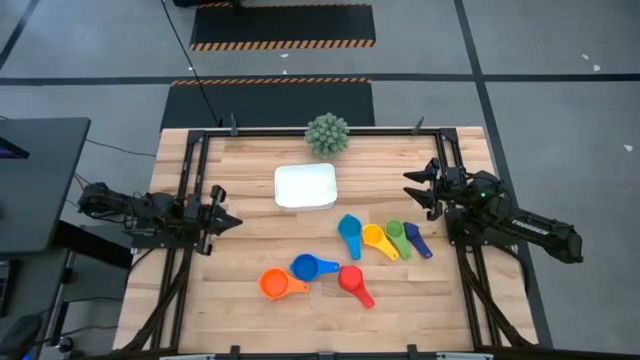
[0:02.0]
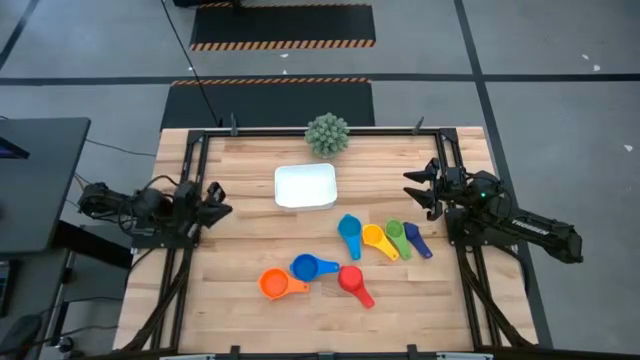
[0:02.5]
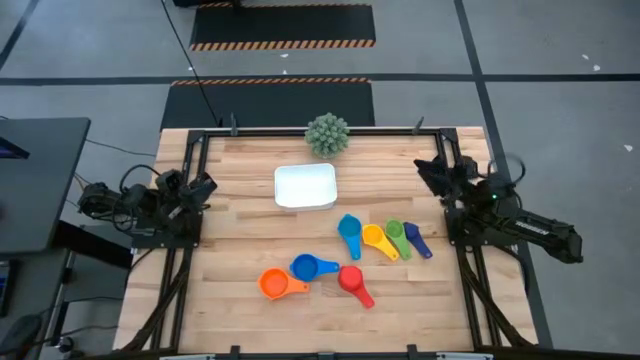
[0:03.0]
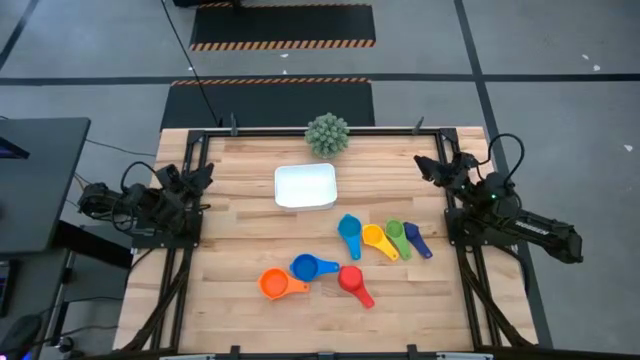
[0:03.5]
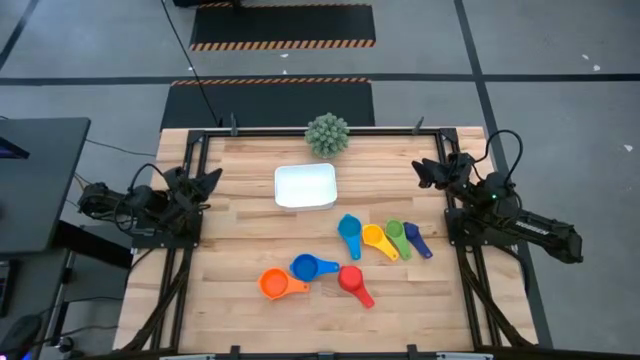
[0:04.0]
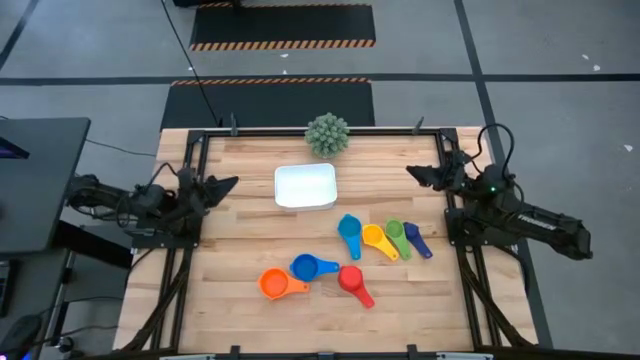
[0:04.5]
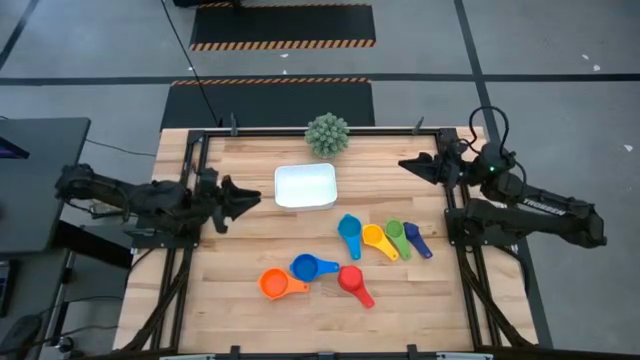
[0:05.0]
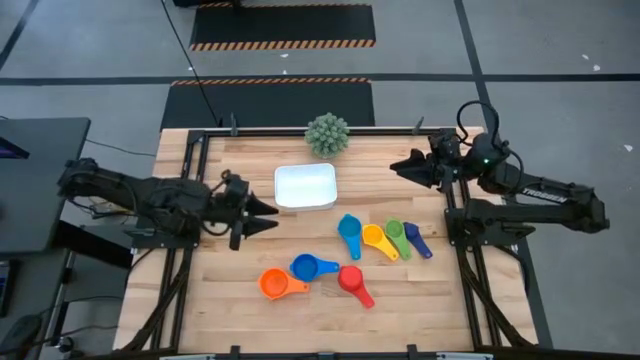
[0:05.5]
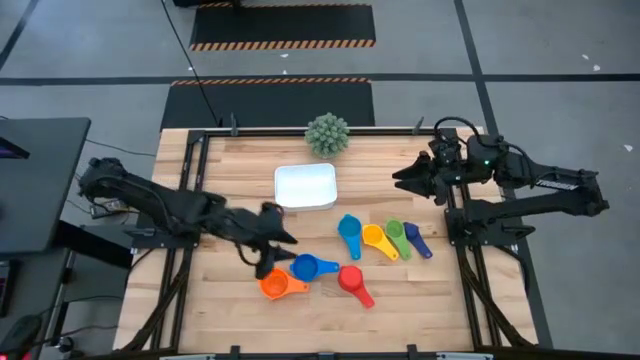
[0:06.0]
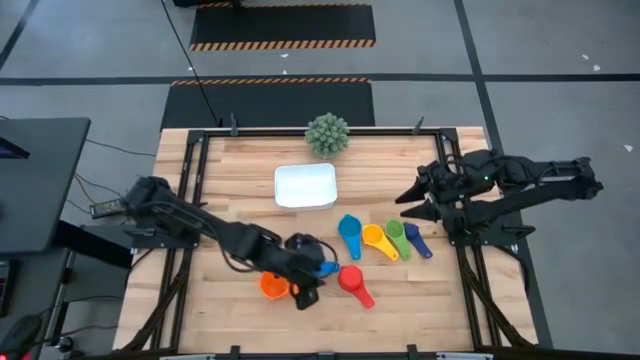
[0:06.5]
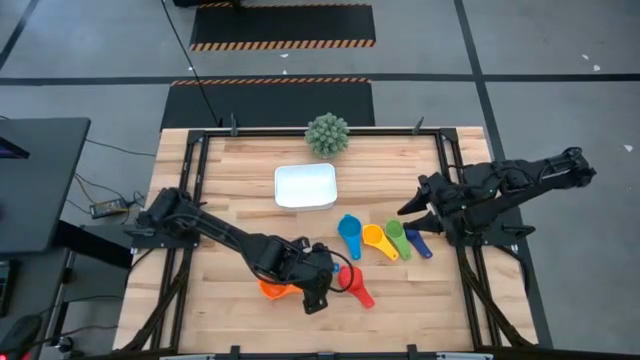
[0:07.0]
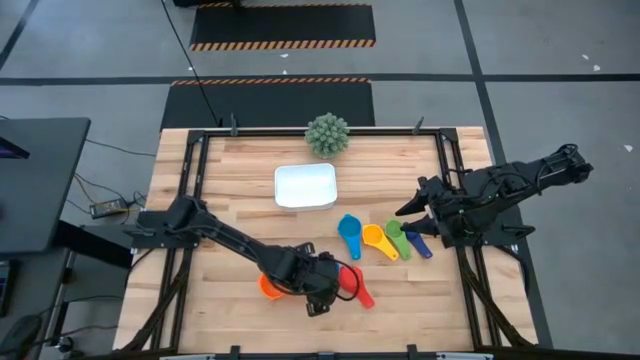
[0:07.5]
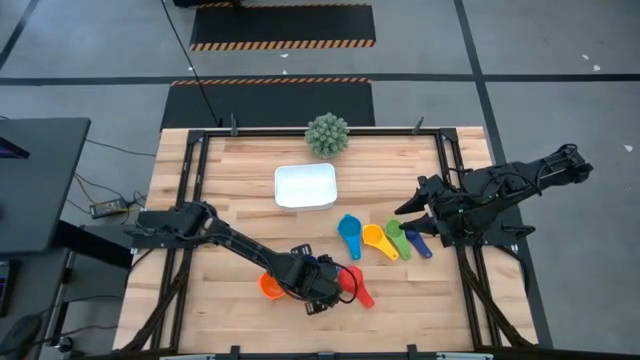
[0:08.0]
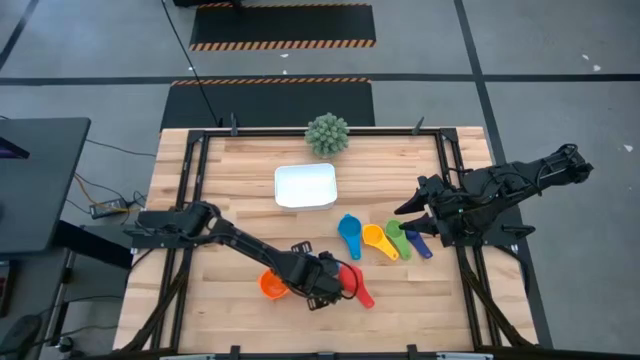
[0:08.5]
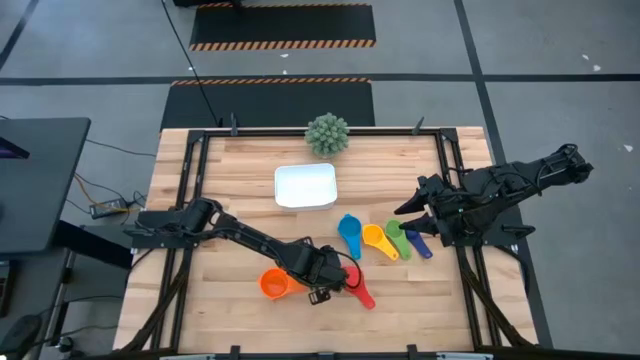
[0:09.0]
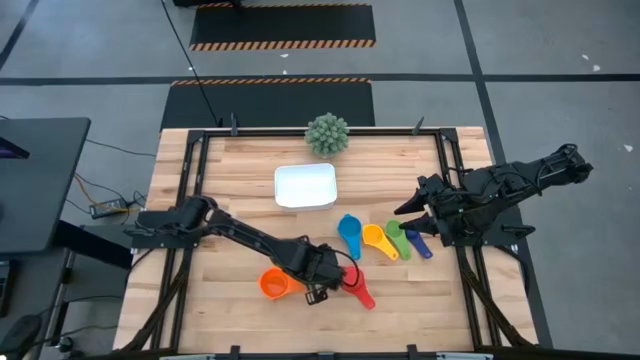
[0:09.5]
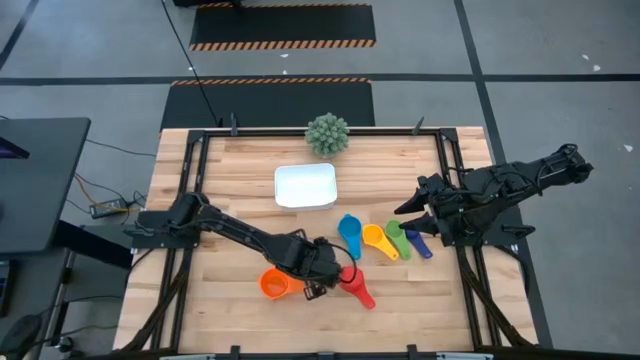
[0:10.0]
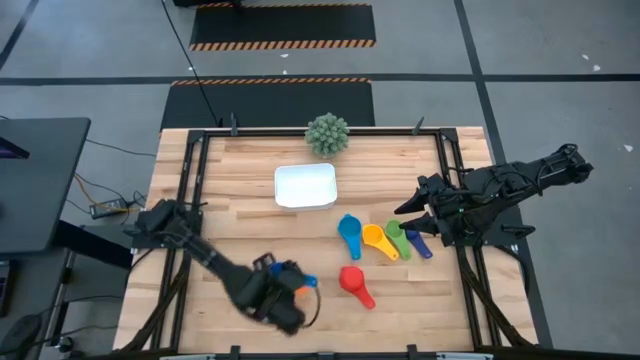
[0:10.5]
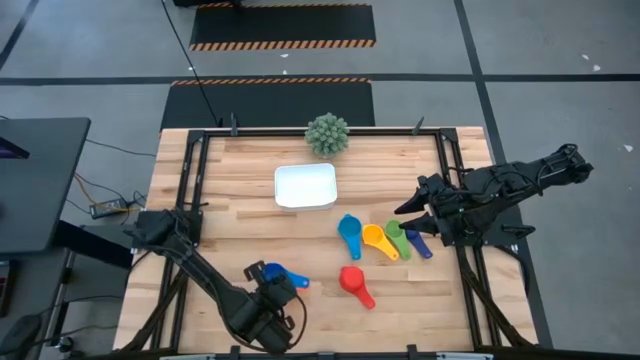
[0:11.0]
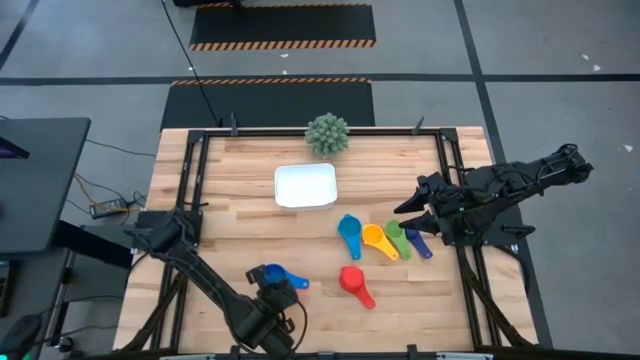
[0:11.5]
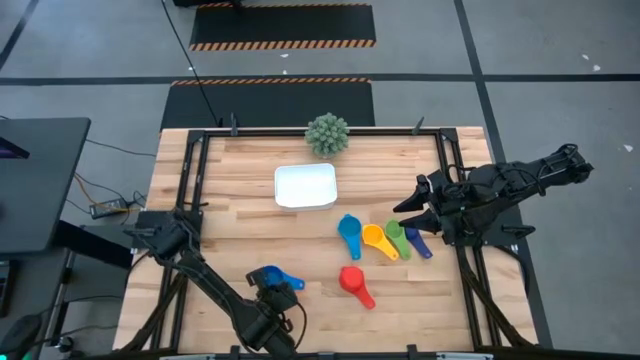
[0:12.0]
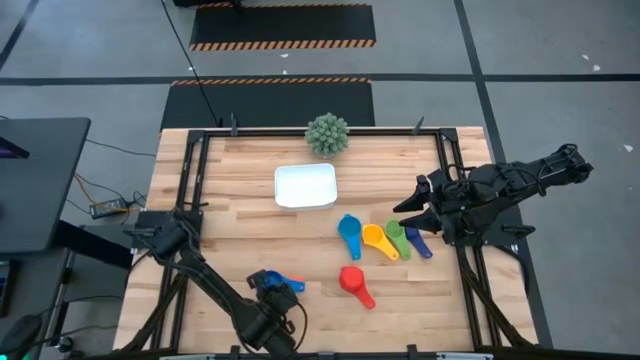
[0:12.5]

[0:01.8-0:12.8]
Task: Nest measuring cups in basket
Stack the blue measuring cup into the orange measuring cup

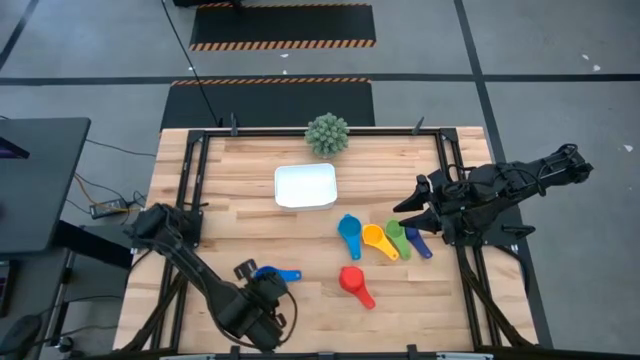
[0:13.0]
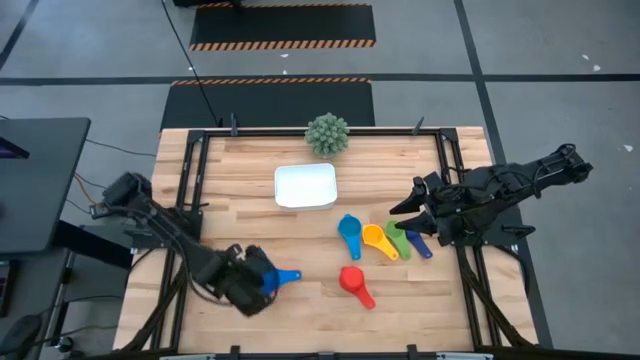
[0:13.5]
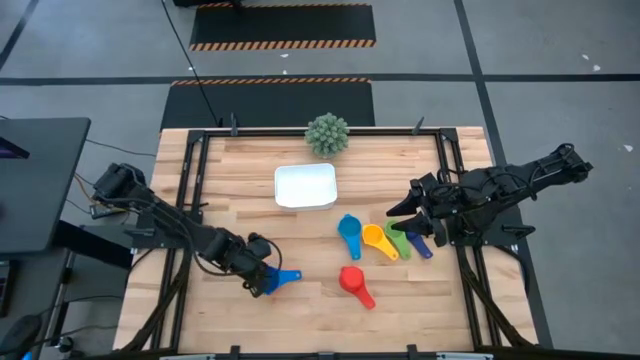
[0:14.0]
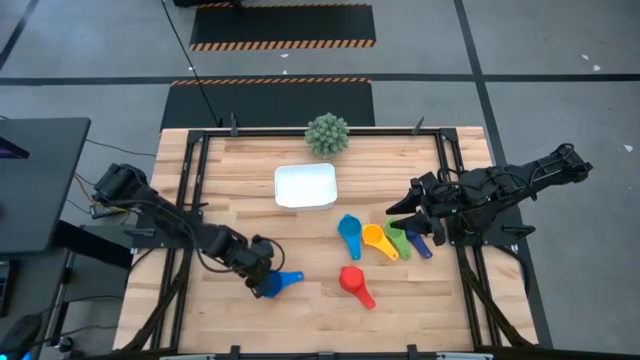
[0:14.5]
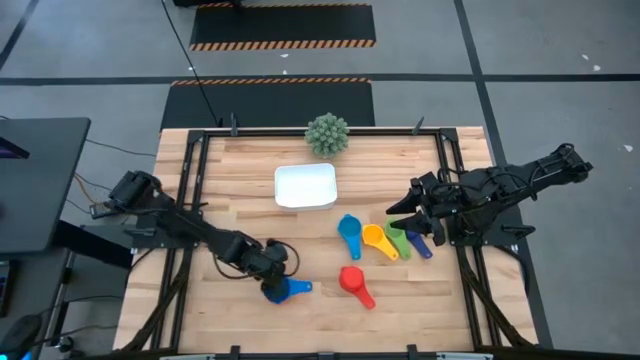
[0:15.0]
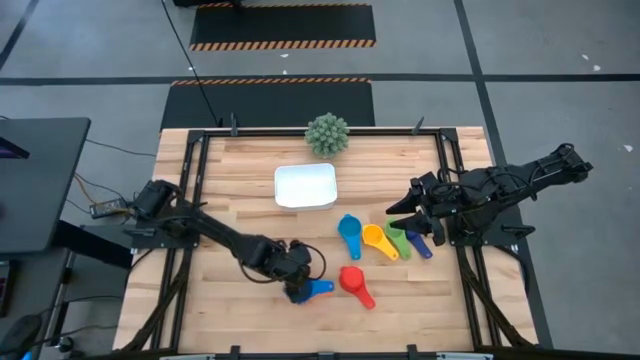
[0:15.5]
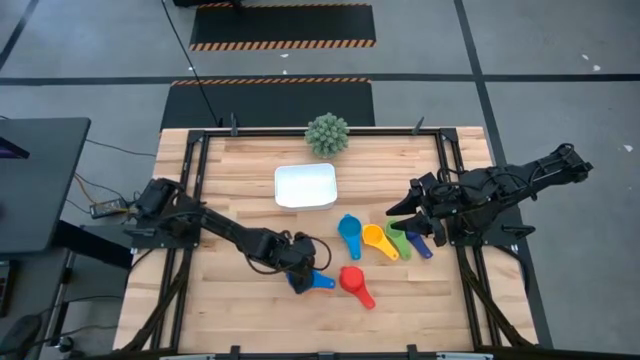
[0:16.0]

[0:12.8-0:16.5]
Adjust the stacked measuring cups

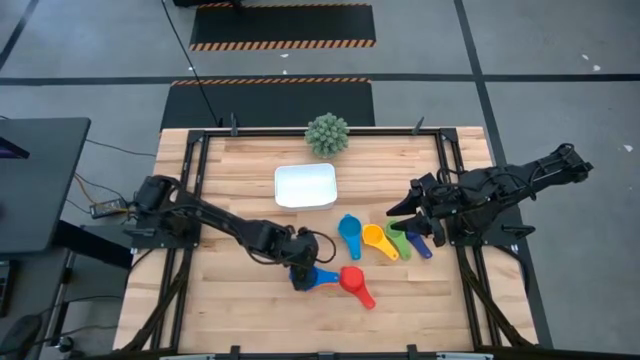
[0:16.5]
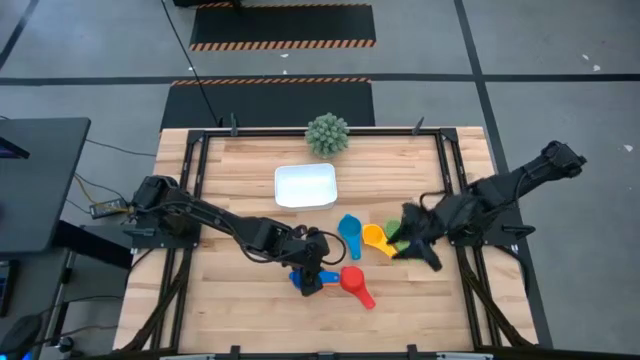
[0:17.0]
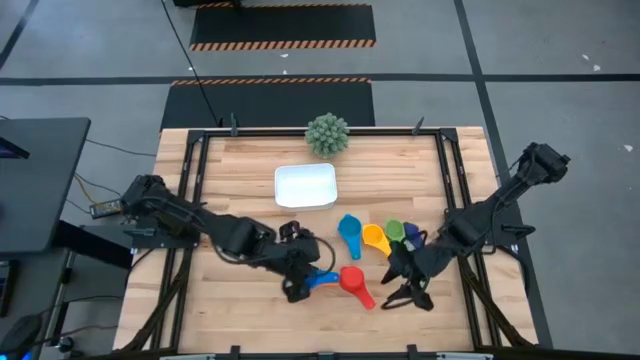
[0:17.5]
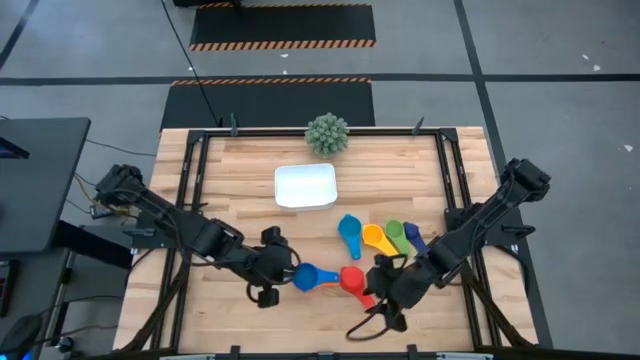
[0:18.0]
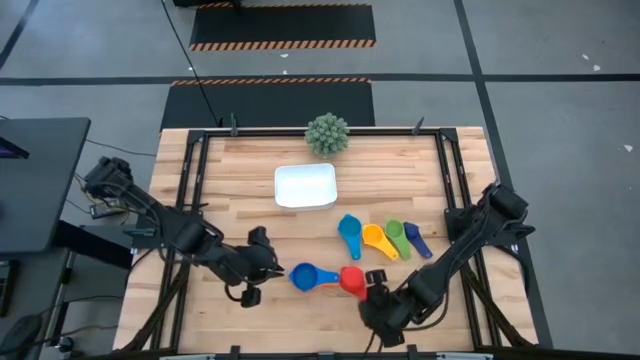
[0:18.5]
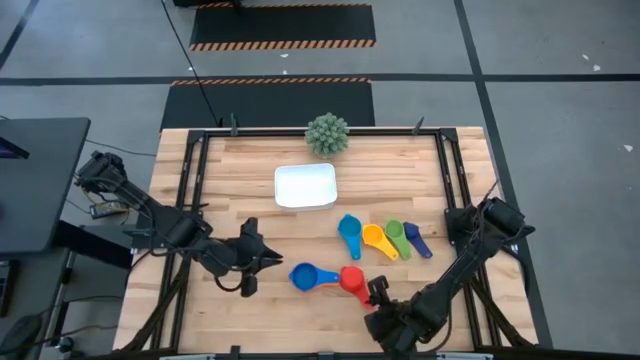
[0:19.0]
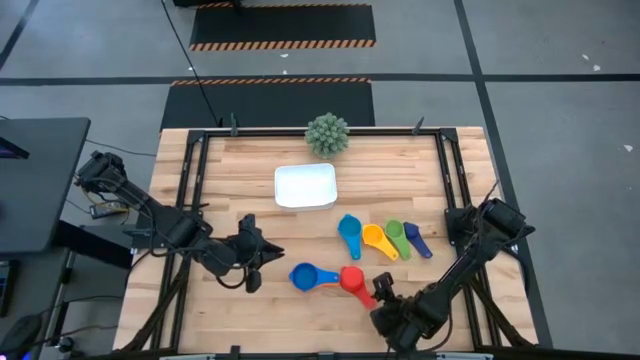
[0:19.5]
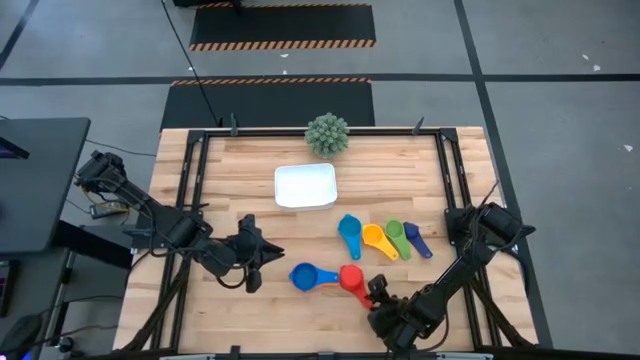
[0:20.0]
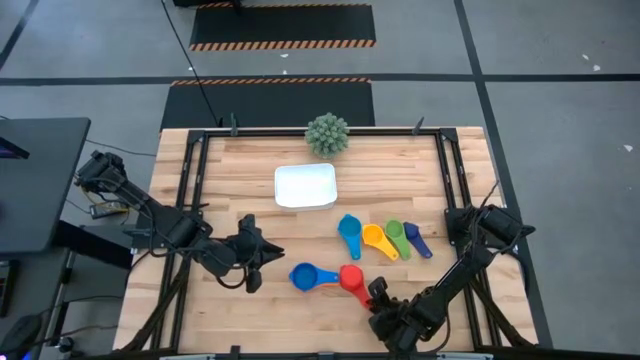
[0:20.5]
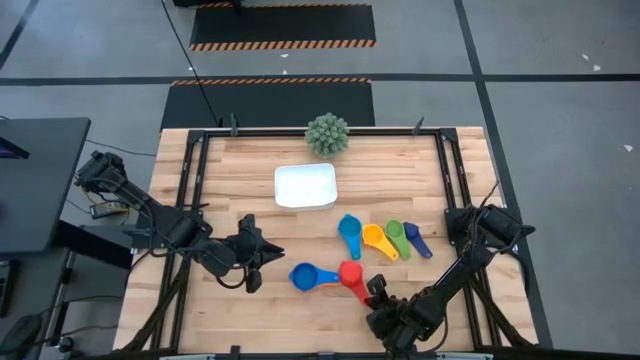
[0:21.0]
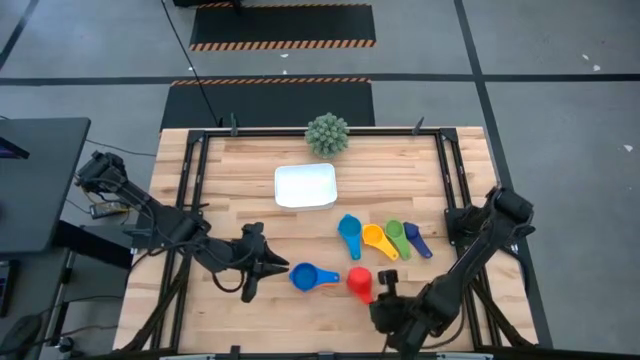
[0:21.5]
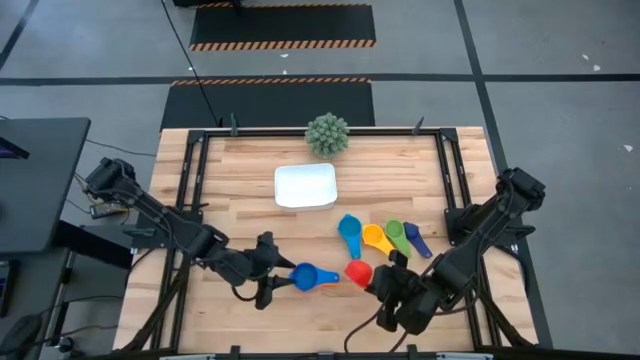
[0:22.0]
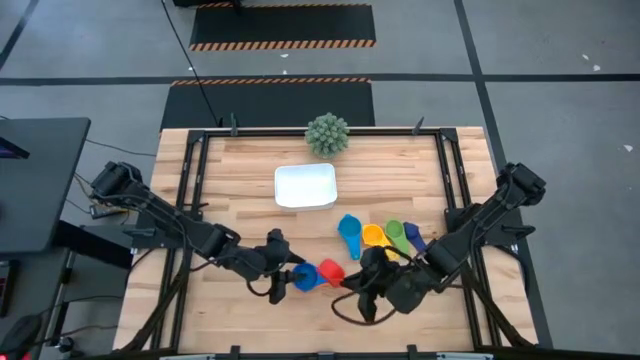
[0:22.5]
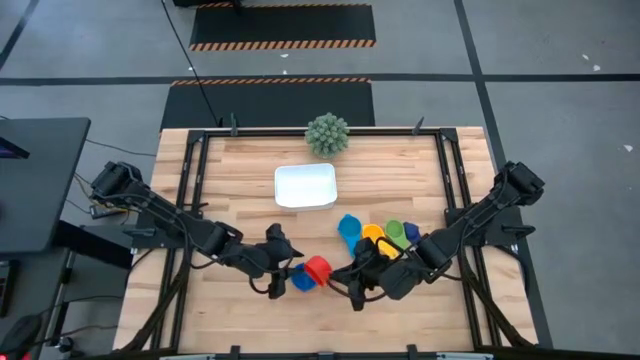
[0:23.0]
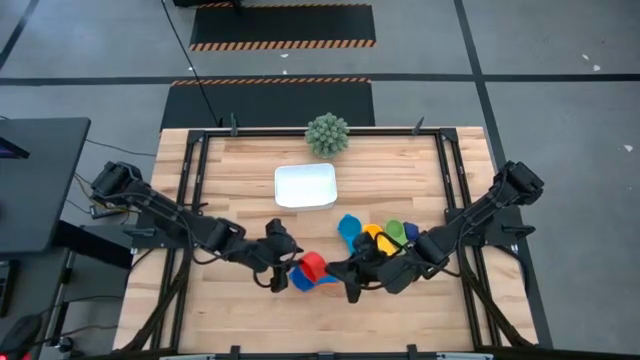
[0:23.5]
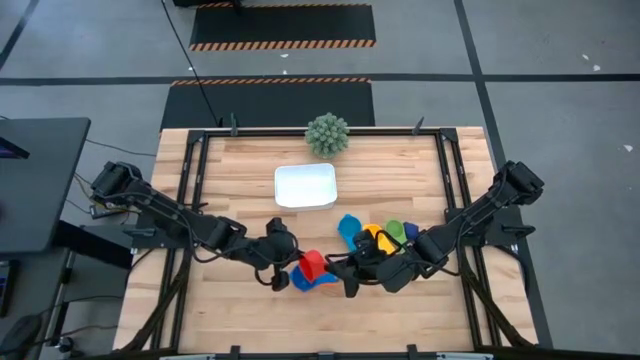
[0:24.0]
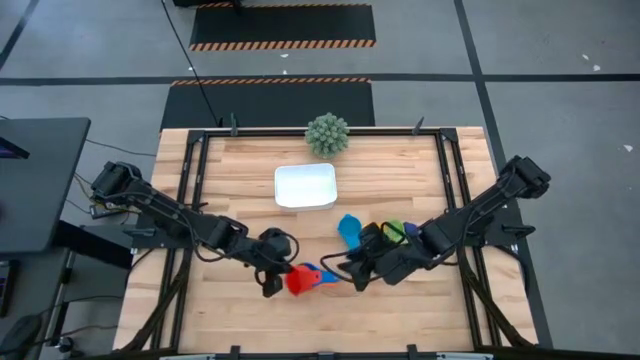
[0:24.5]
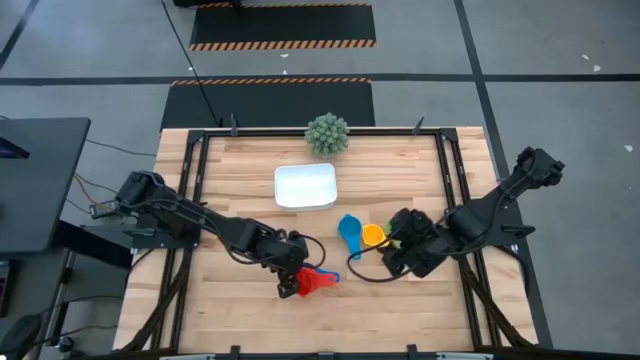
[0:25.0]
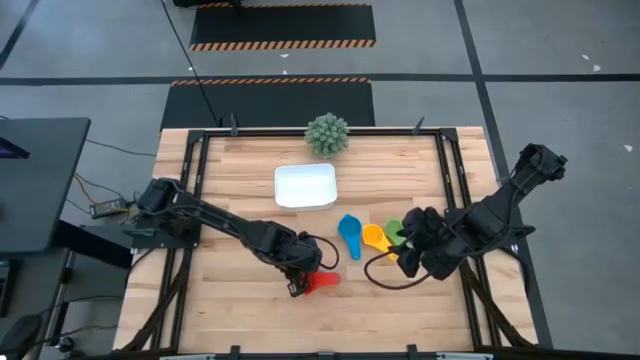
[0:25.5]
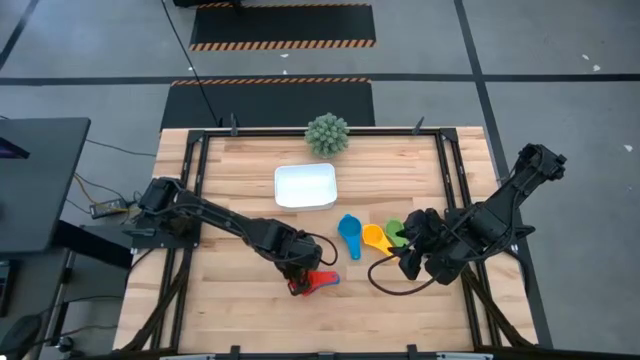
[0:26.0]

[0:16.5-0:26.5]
Stack the red measuring cup into the blue measuring cup
